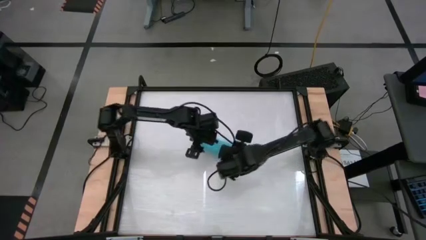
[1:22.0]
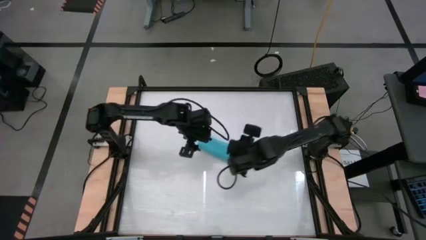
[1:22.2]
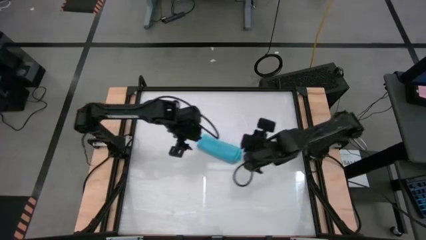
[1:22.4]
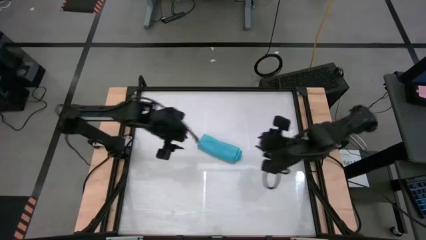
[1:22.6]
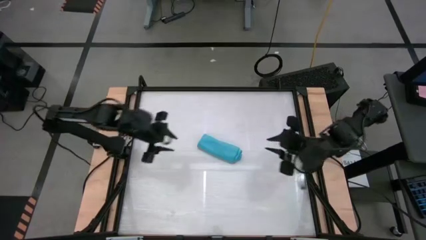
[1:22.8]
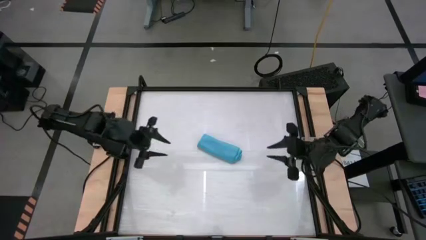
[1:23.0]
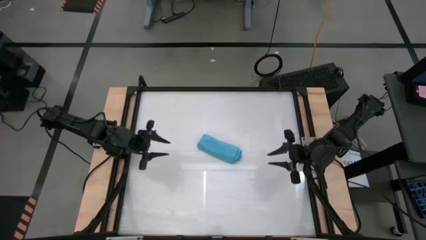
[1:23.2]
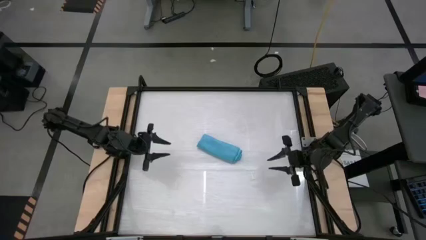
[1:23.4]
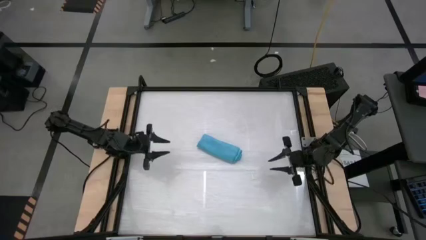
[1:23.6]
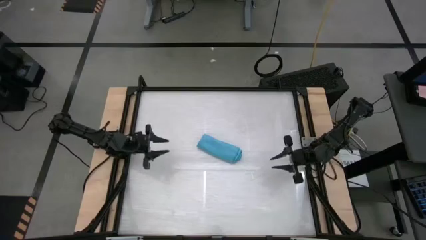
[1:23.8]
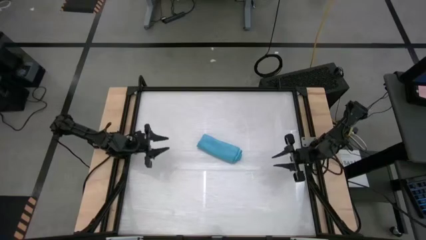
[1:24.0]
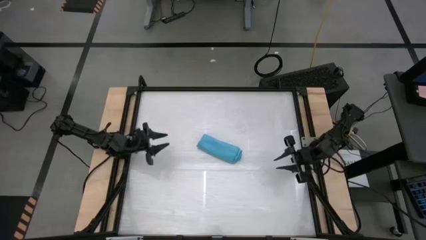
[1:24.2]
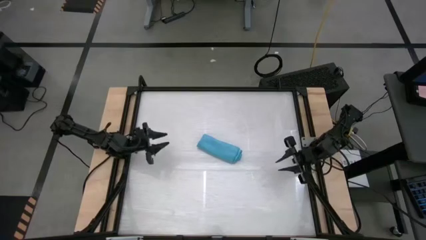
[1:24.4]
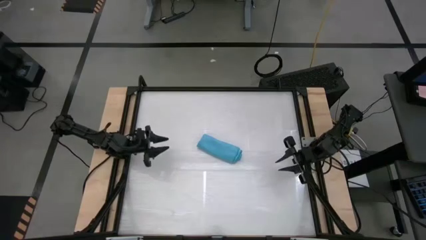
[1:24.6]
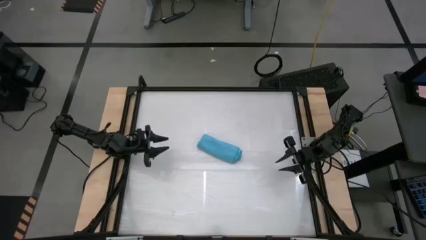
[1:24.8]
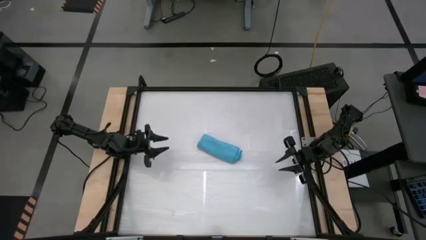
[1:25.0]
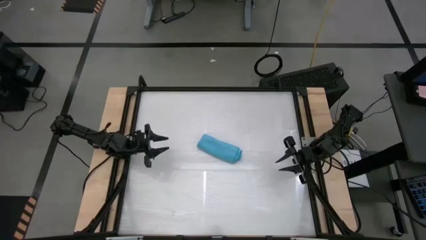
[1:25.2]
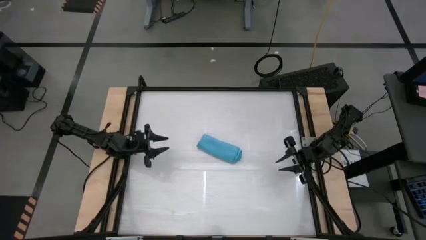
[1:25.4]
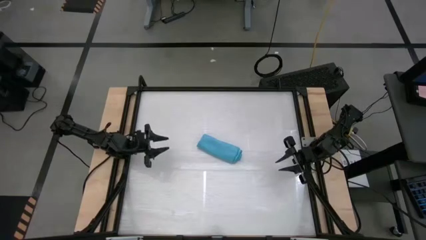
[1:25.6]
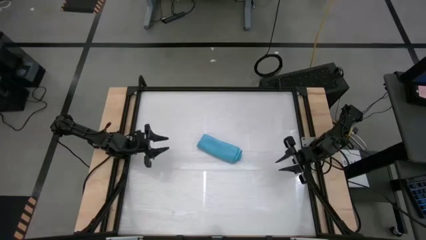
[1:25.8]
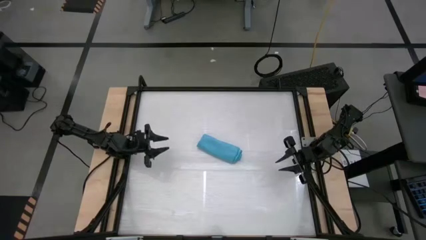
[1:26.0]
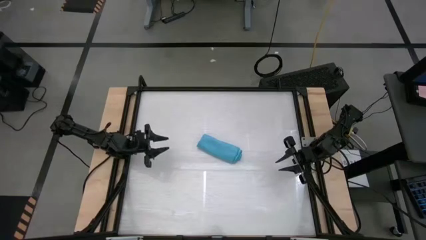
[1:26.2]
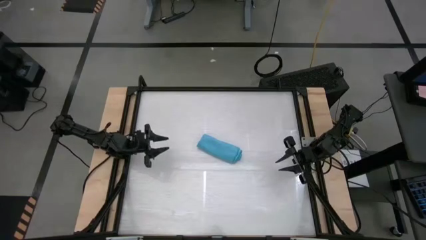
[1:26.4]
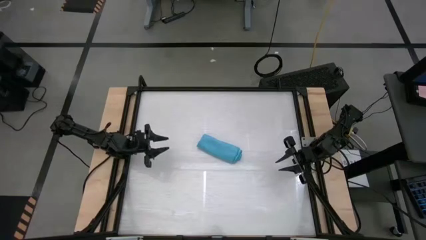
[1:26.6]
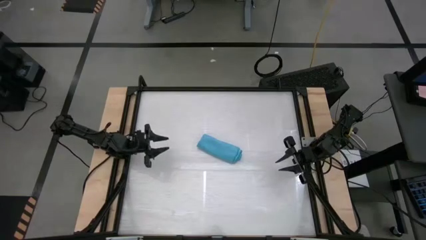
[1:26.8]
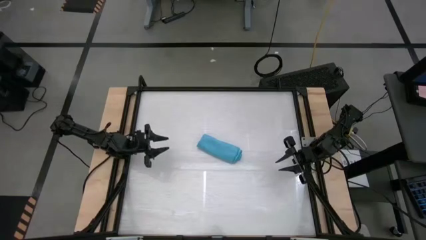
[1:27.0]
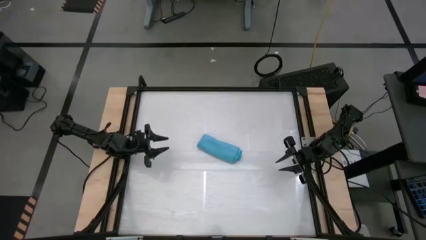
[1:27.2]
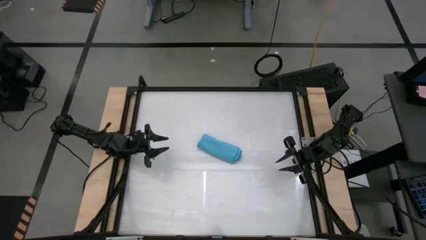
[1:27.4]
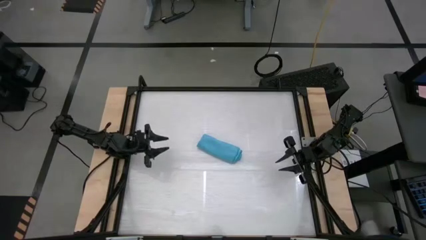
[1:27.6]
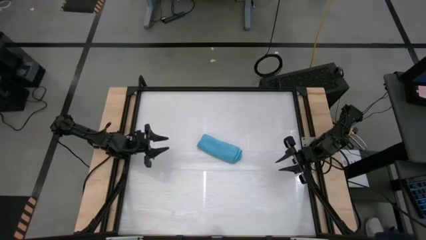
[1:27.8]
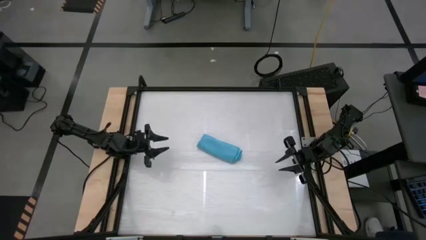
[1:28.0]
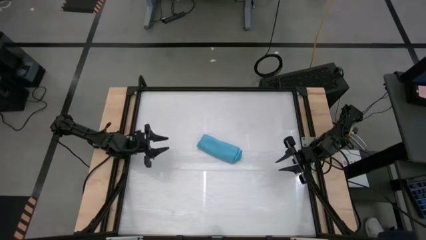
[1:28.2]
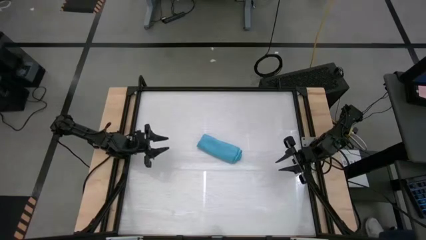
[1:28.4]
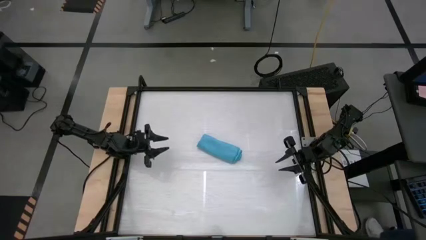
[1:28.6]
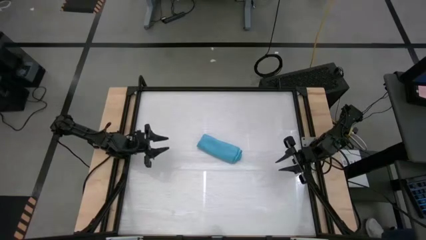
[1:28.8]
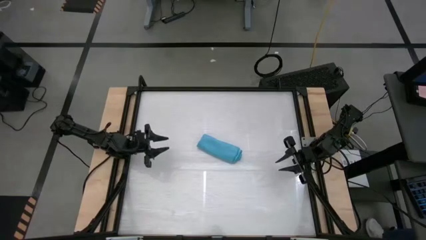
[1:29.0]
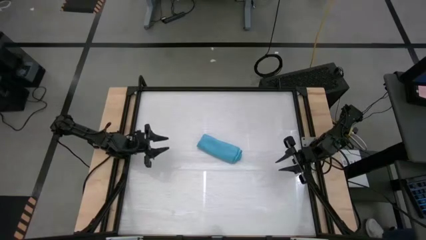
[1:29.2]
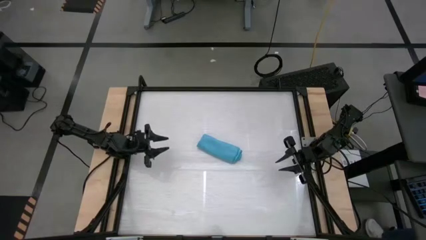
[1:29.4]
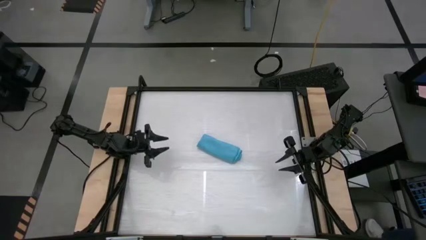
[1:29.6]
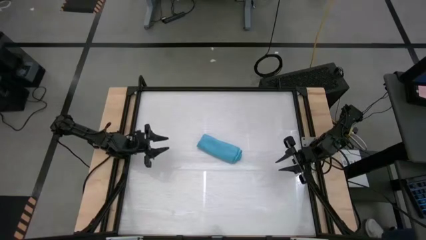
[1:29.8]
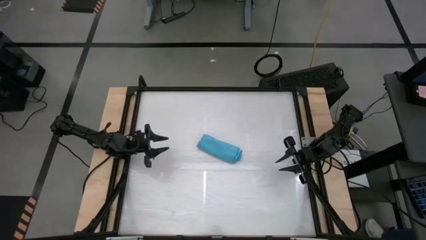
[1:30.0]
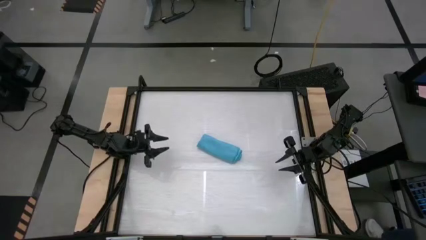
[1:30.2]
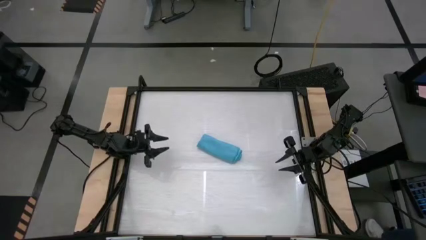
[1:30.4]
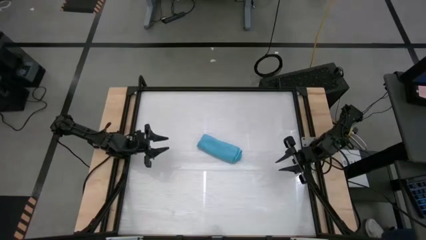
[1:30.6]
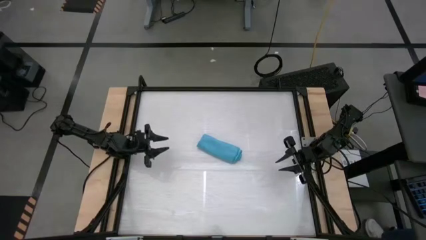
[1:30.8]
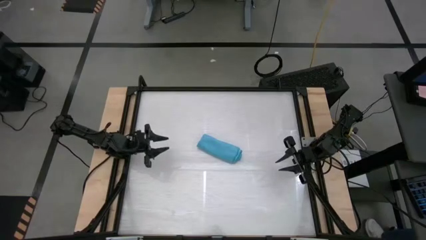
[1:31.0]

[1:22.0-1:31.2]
Task: Roll towel
Return to Home Position

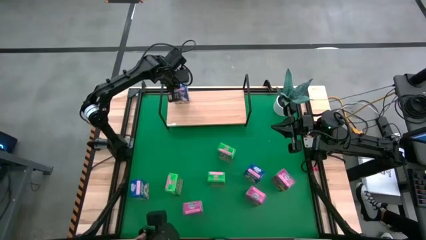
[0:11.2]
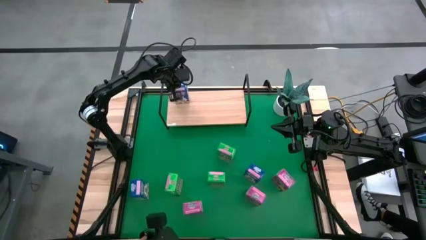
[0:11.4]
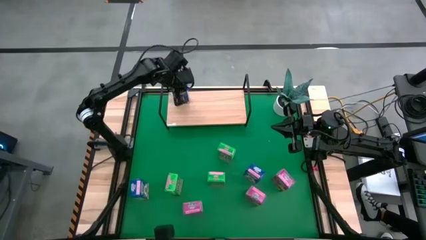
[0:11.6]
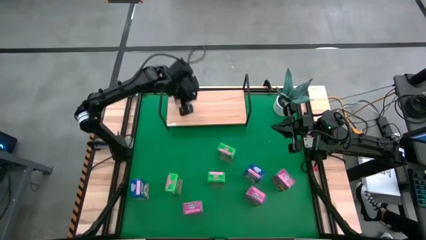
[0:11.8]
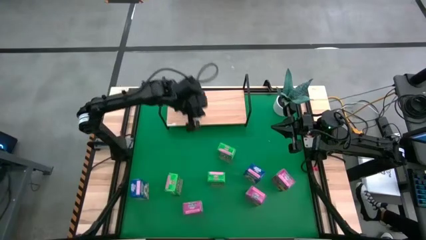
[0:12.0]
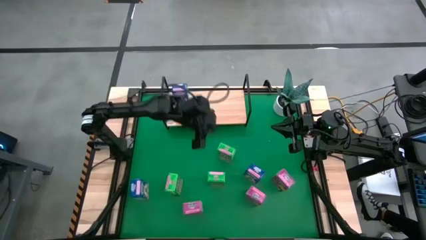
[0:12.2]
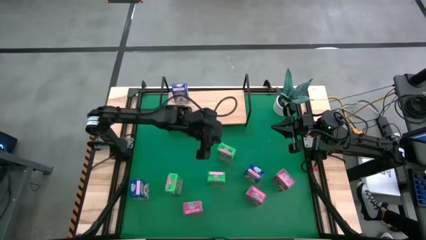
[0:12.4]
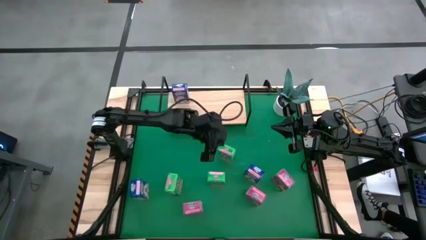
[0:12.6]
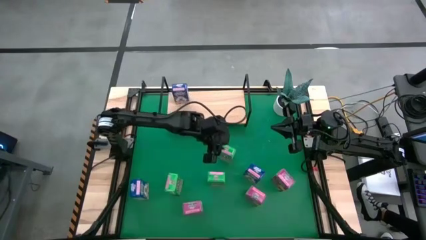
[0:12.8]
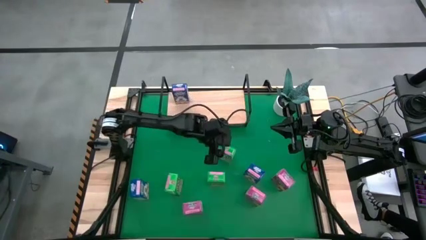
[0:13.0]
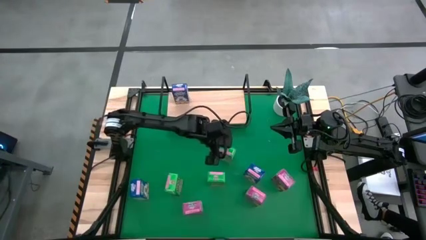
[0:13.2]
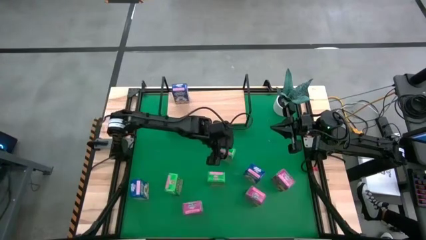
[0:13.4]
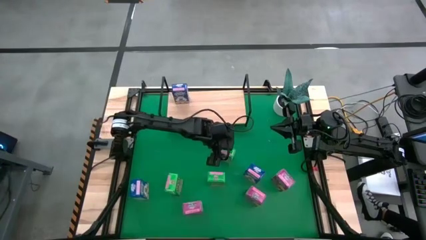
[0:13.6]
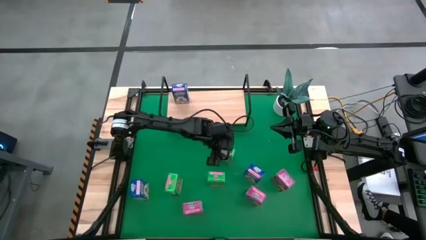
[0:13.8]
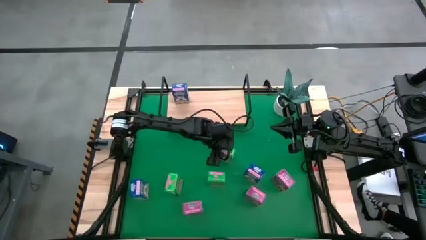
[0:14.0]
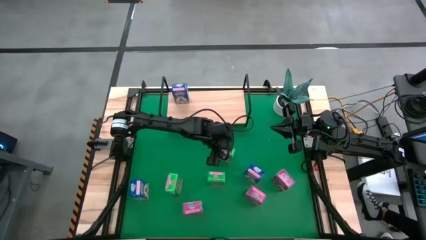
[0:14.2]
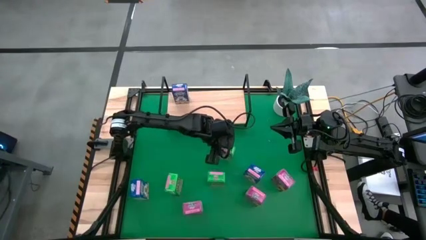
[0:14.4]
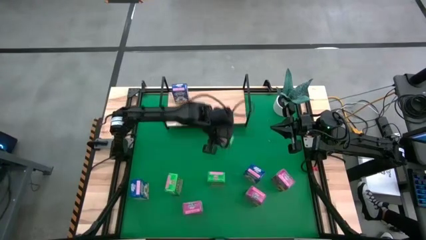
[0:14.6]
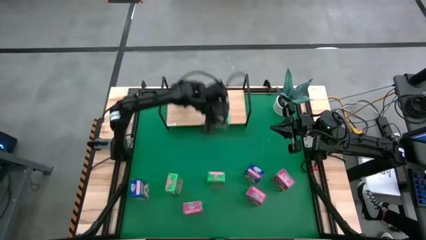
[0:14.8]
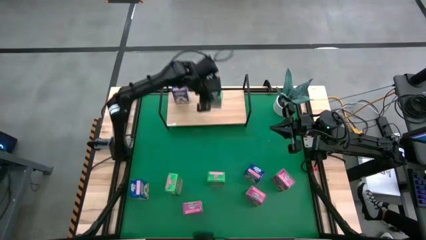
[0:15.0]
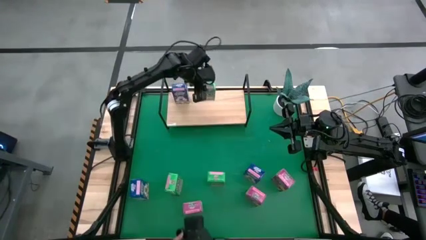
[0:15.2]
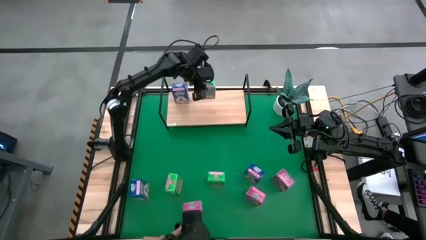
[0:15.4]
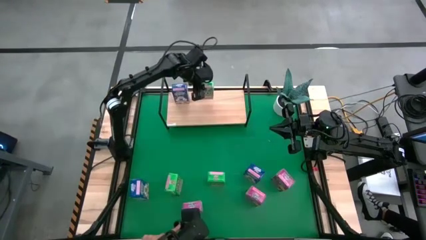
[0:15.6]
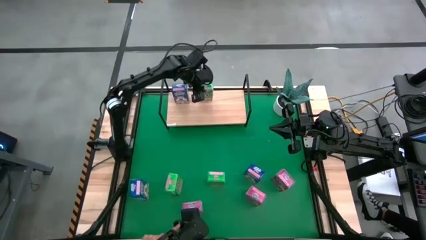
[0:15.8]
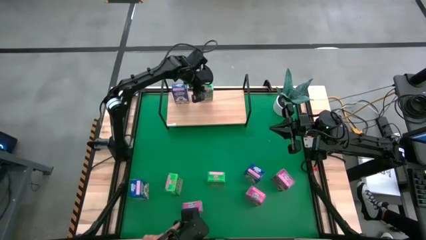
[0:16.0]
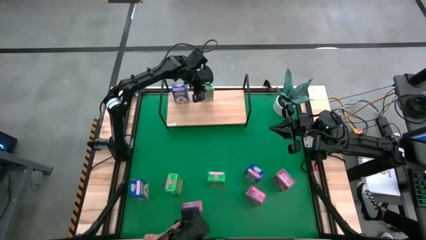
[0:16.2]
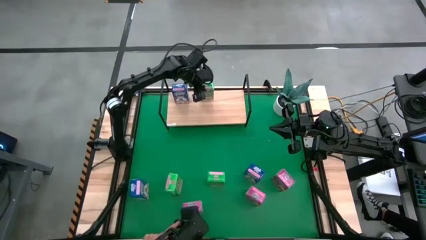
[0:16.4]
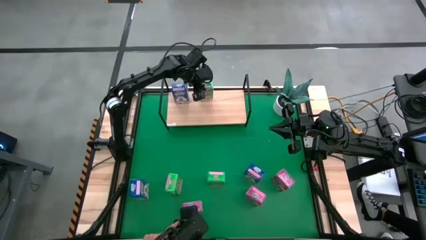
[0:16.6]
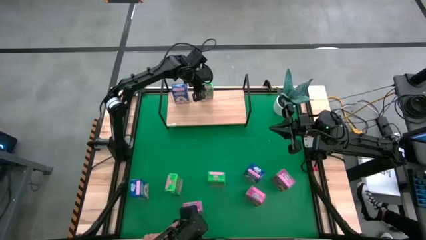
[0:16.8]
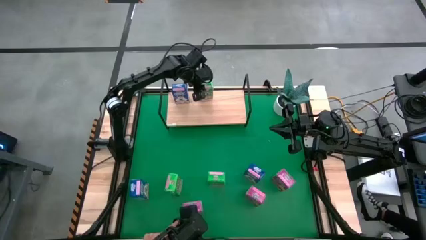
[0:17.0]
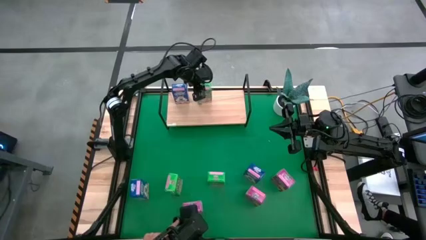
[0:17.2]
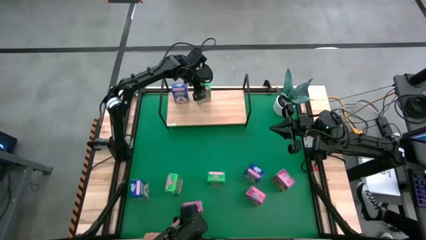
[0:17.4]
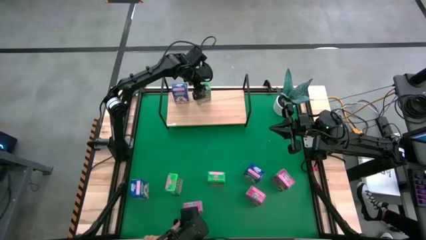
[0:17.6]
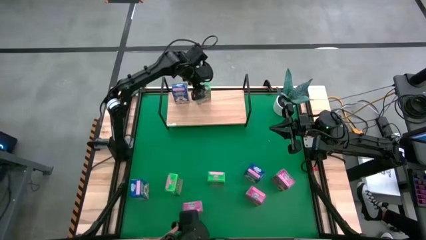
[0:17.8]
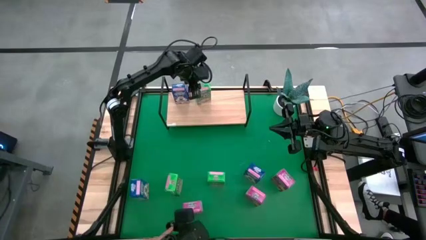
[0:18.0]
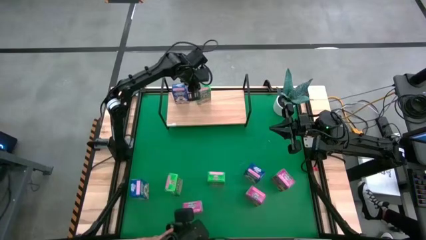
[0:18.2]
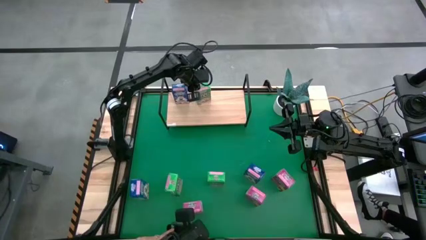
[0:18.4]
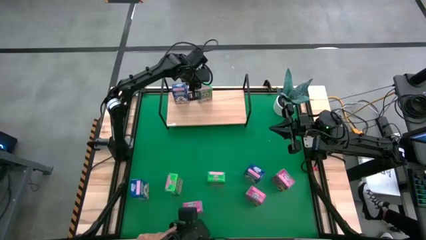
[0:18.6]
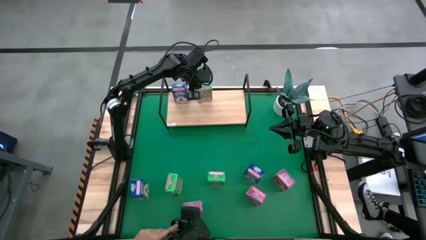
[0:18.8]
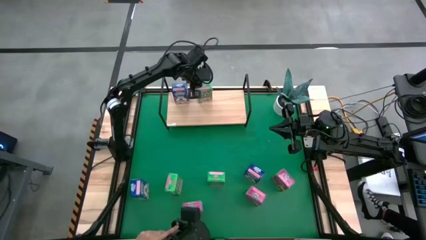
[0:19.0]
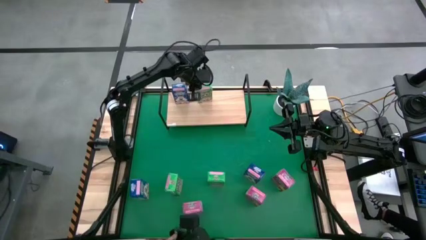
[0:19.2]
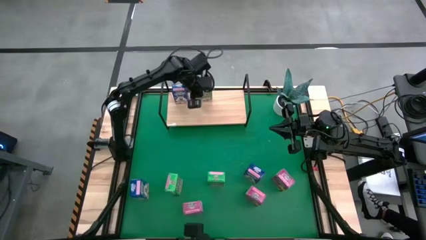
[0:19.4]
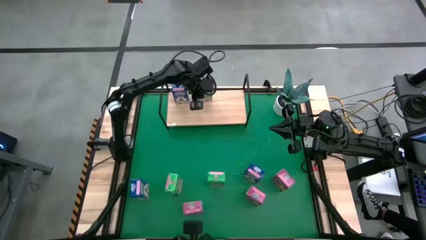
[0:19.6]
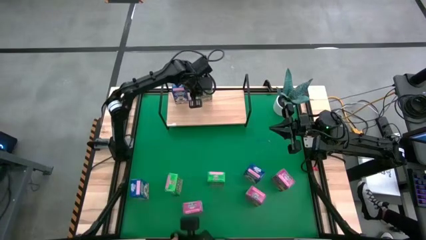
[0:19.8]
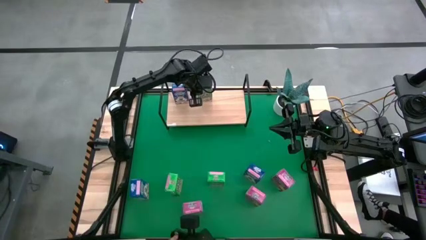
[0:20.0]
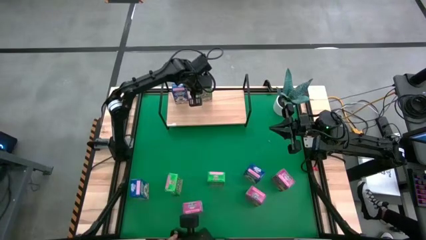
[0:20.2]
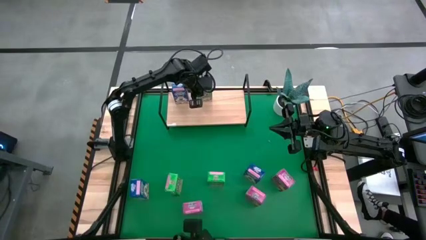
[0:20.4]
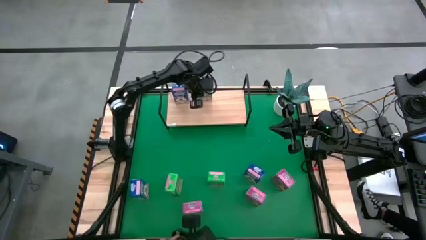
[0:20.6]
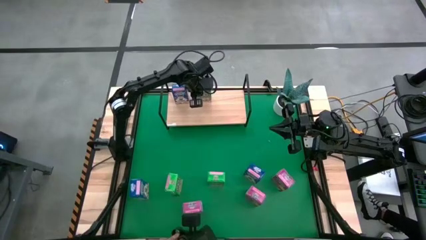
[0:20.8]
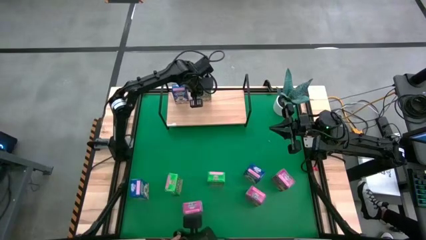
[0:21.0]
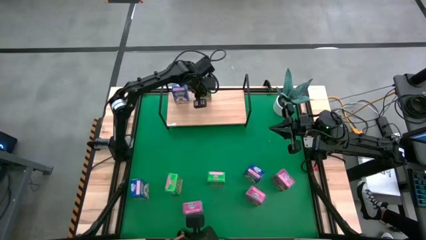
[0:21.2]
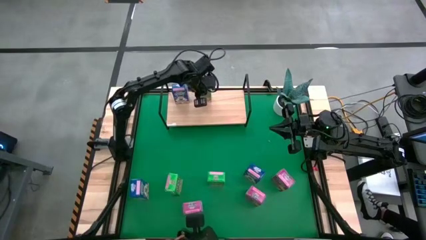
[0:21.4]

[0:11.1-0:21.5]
Task: Stack cereal on shelf
Put the top green cereal box on the shelf
